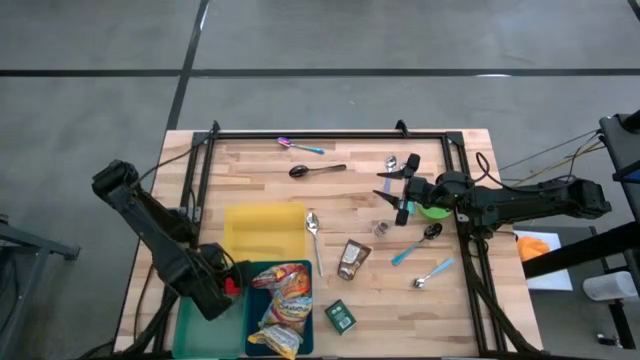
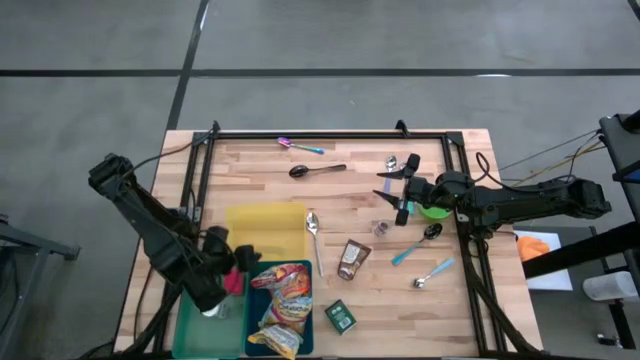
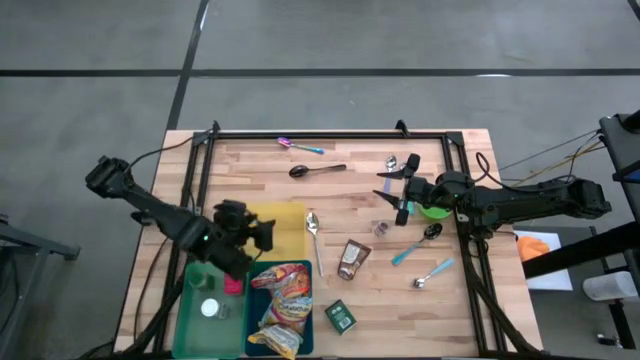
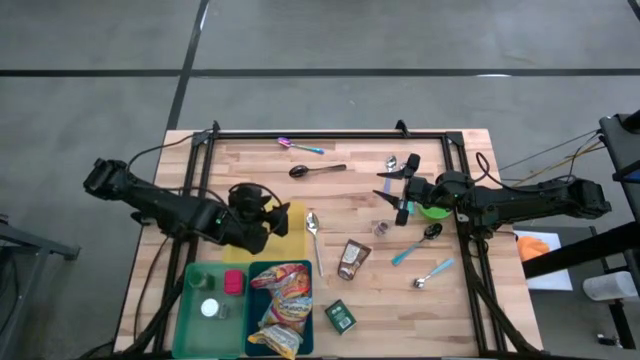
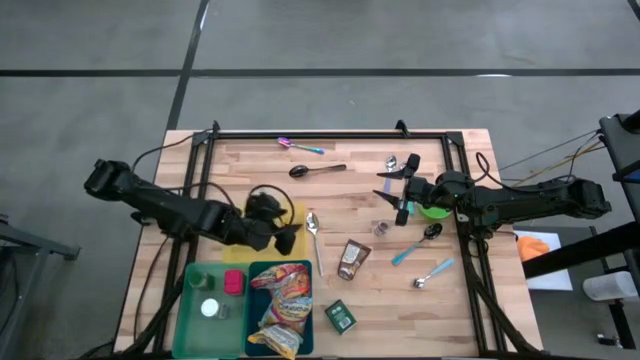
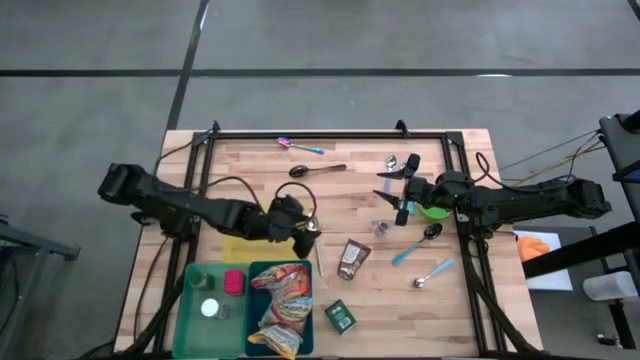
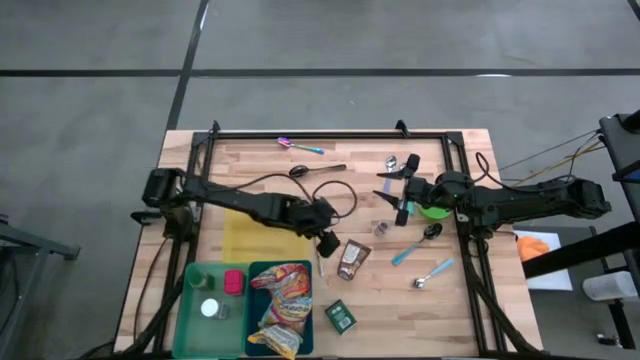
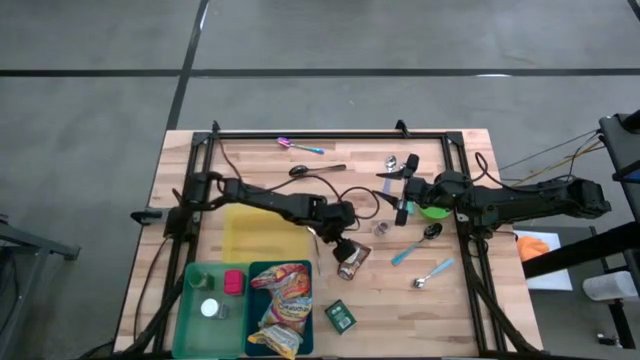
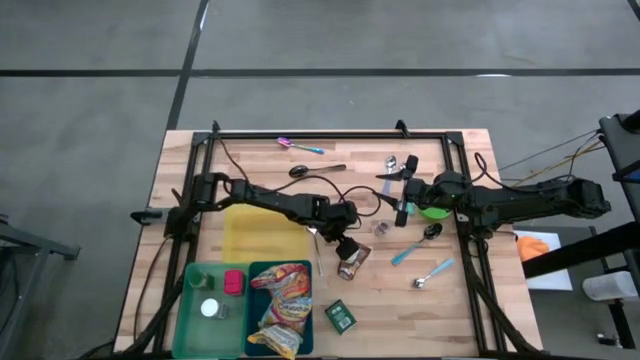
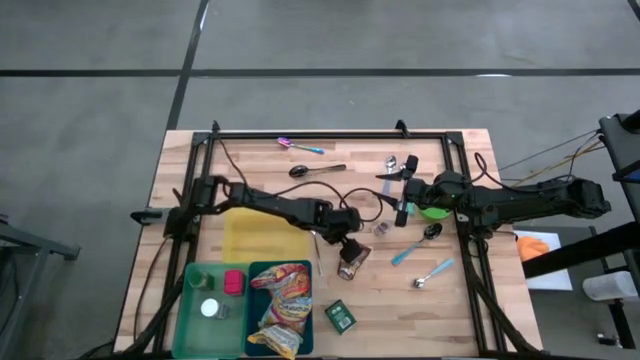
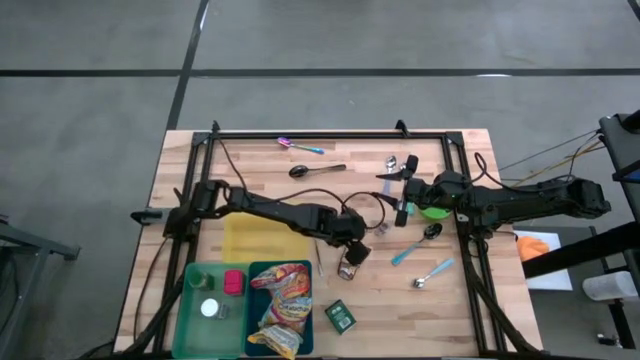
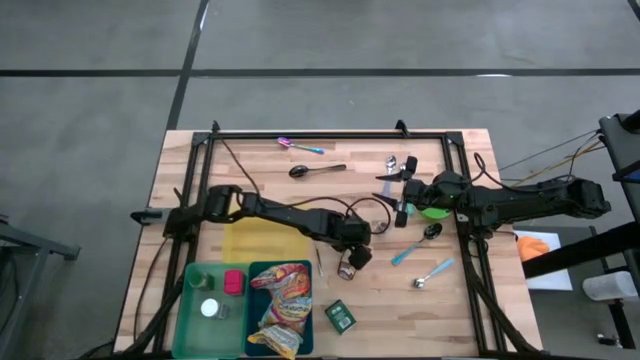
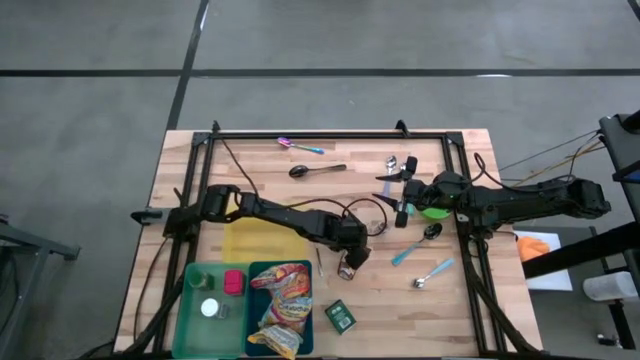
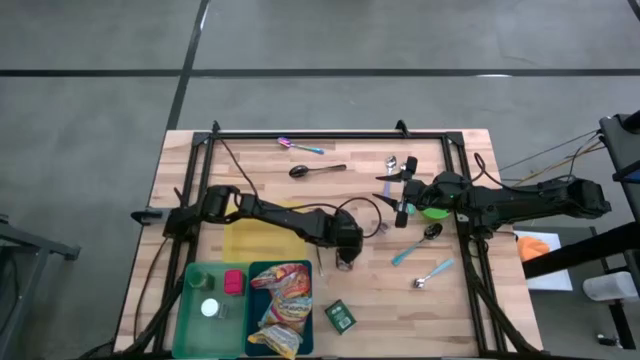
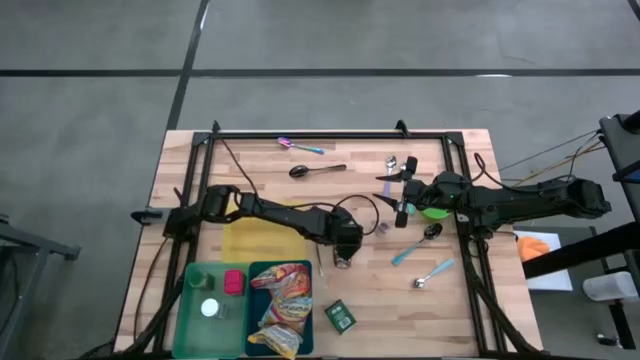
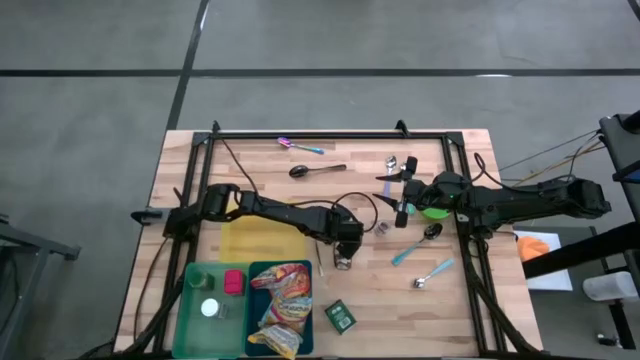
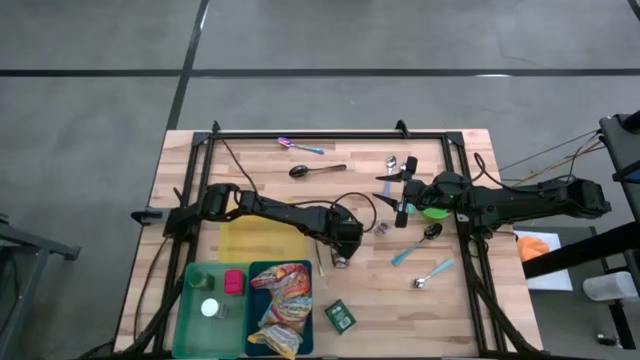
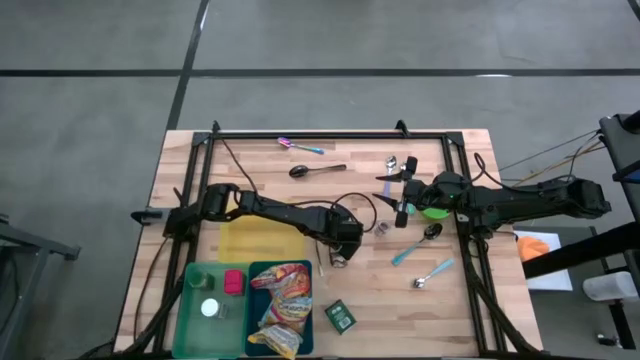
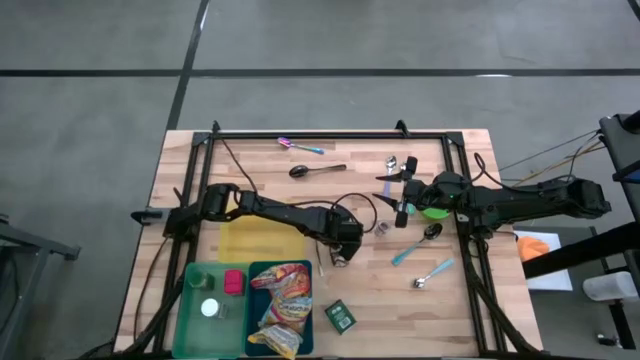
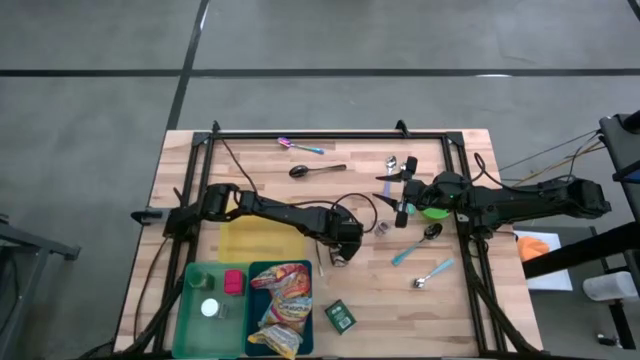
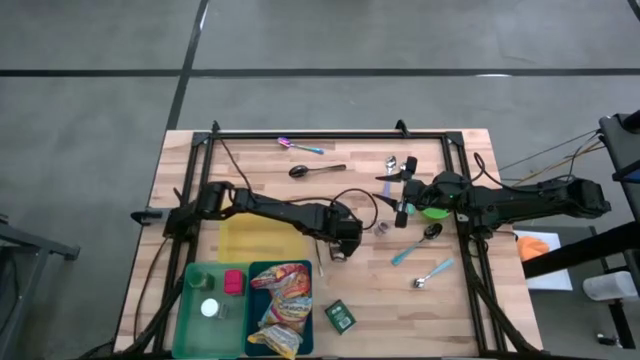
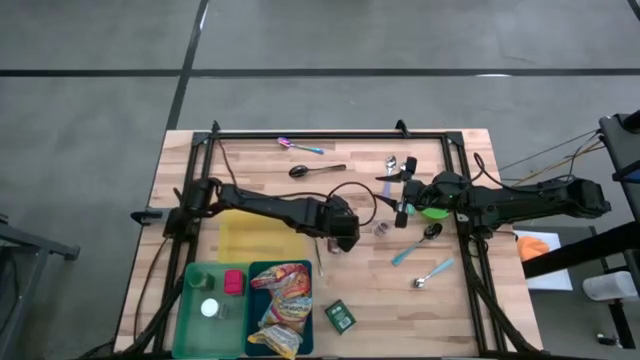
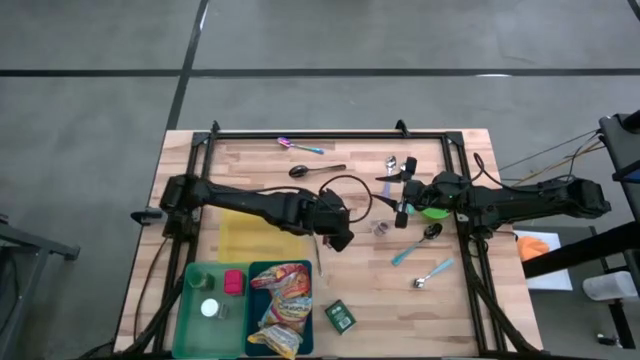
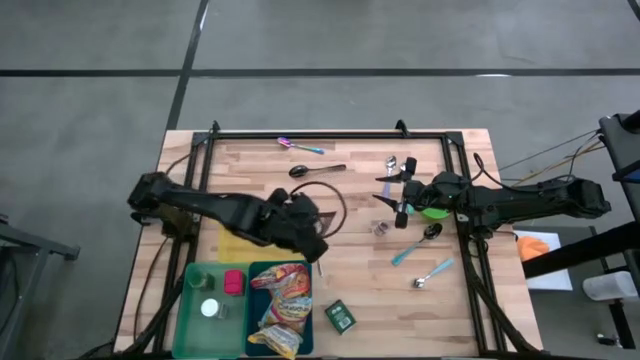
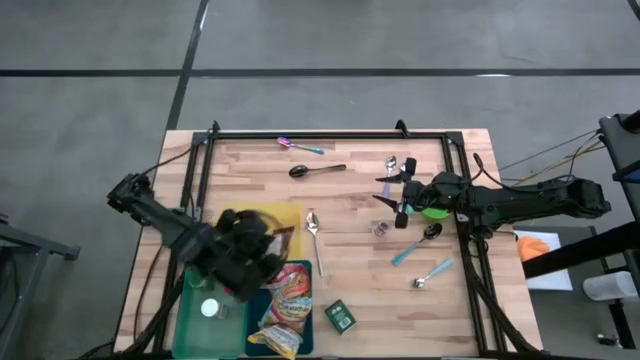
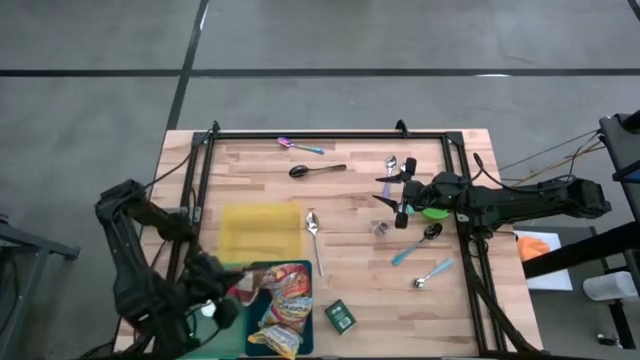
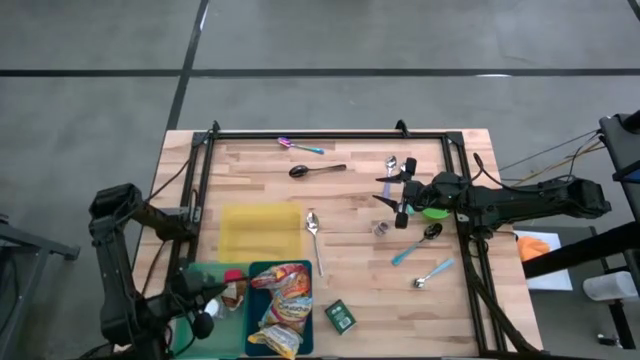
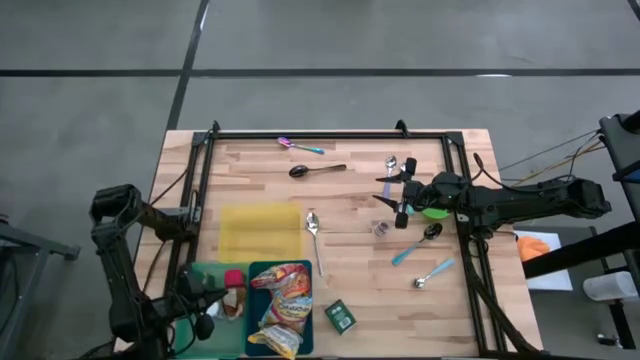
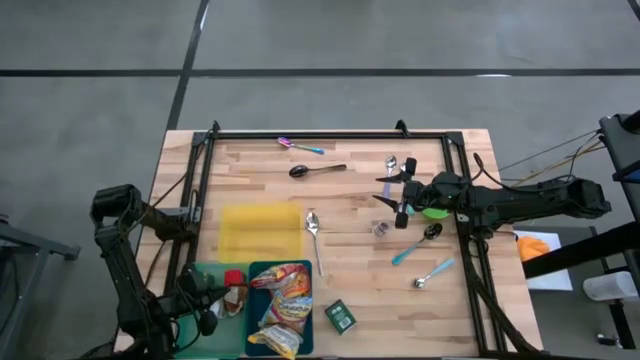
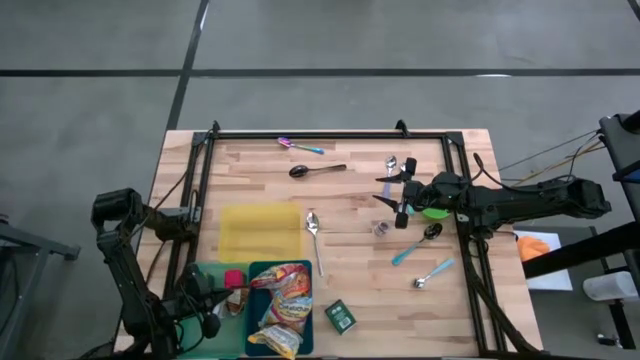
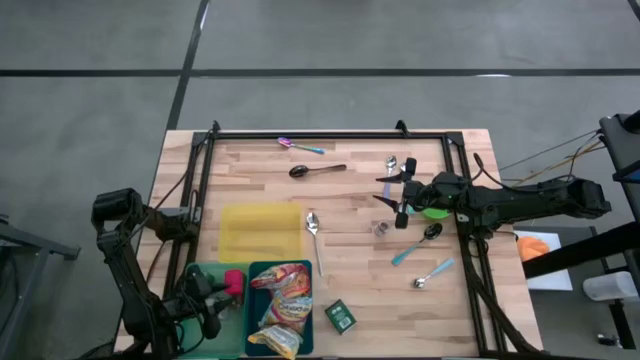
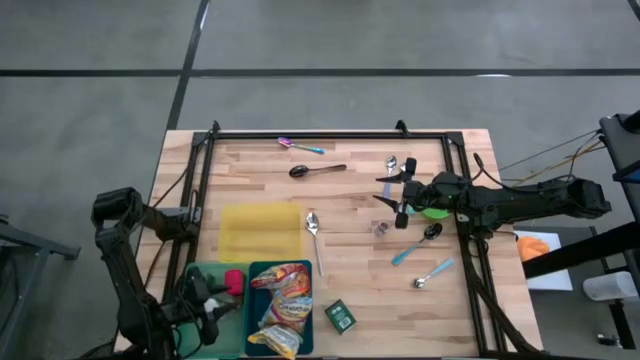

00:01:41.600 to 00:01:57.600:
Put the orange spice pack into the green bin

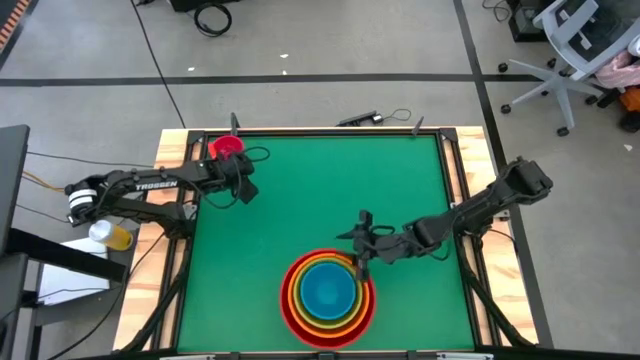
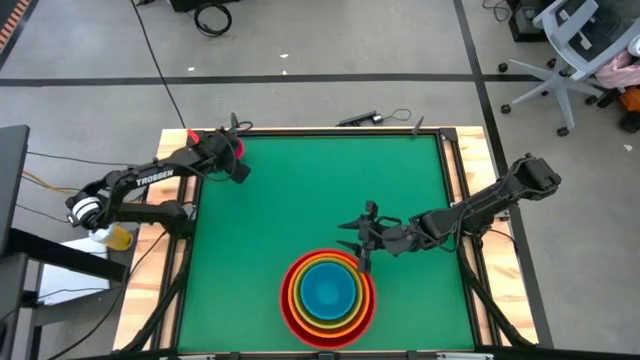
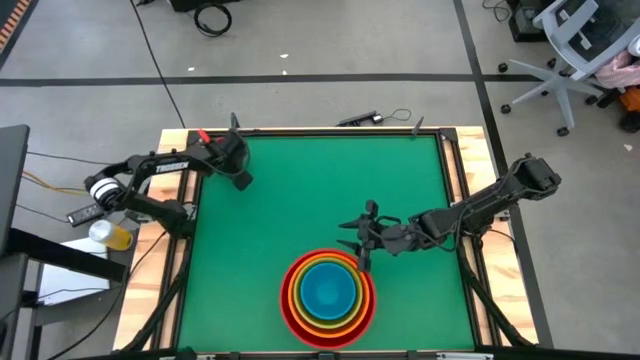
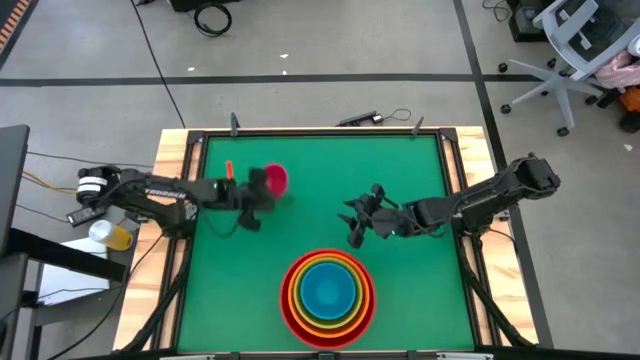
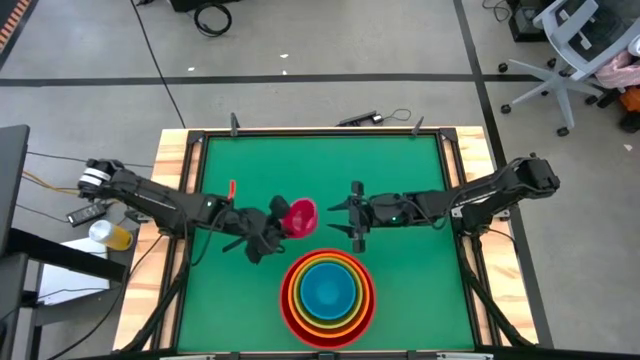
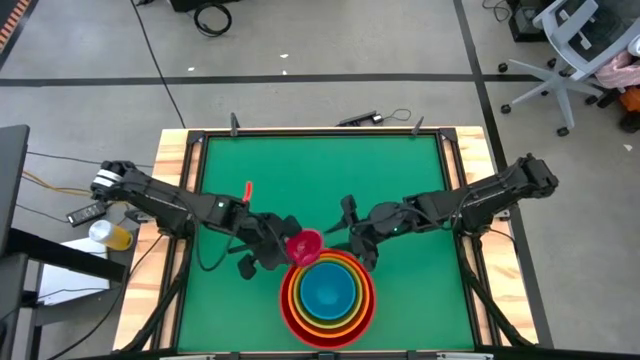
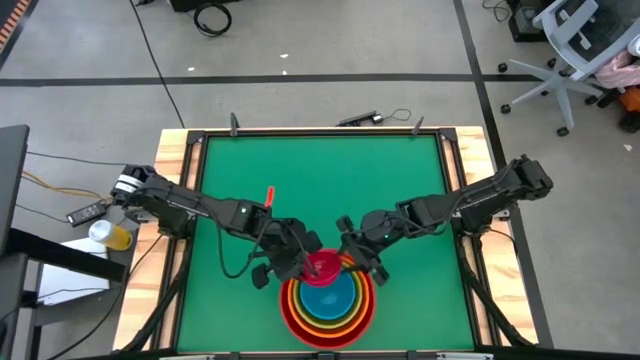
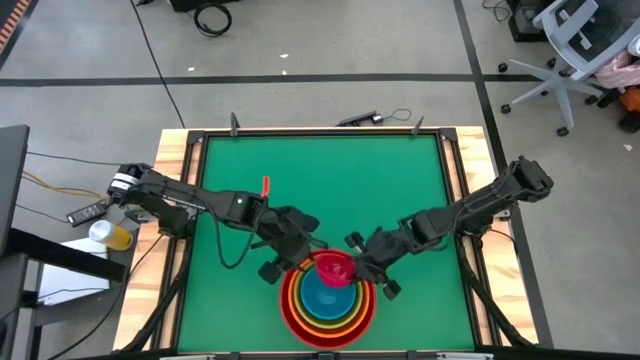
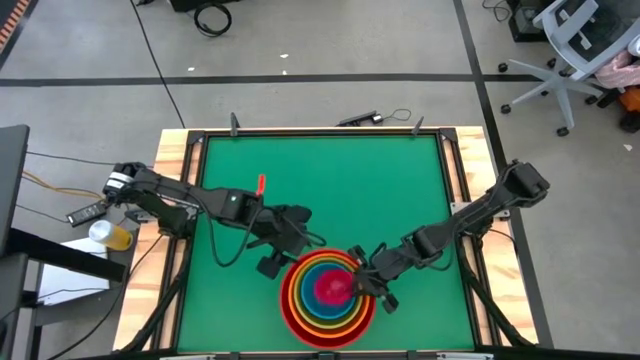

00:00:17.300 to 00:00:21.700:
Stack the small red bowl into the blue bowl
